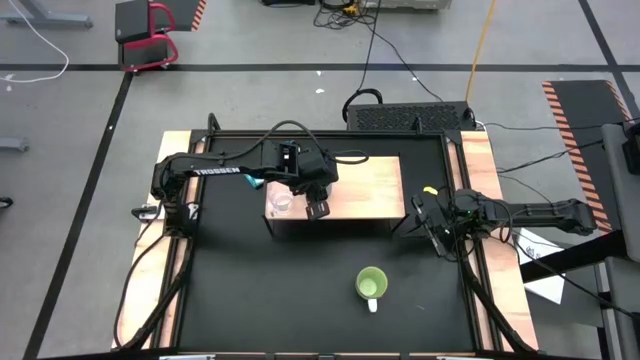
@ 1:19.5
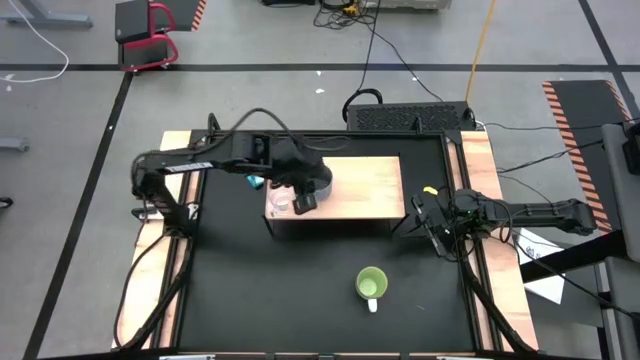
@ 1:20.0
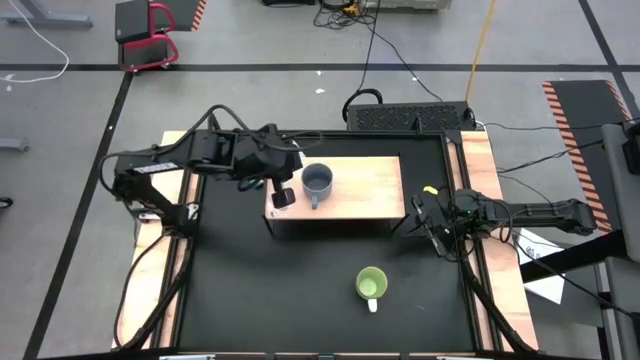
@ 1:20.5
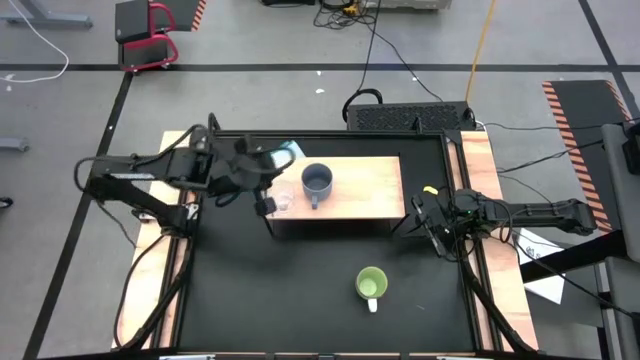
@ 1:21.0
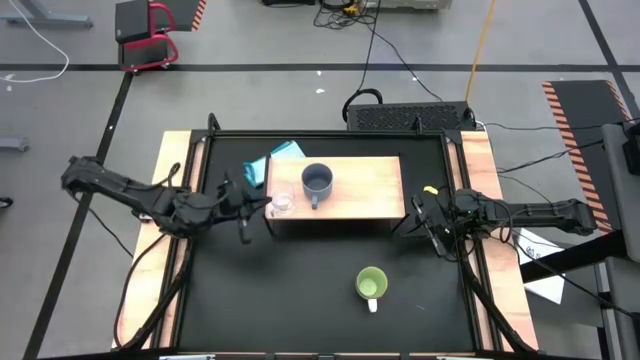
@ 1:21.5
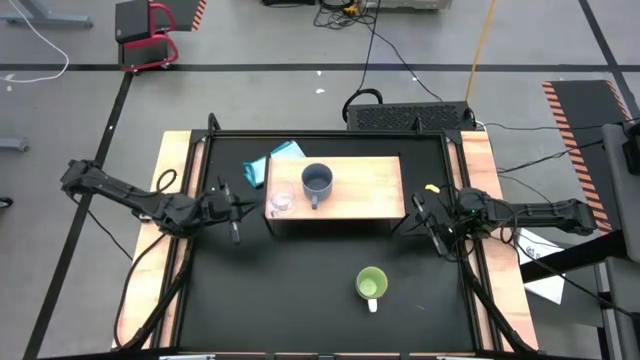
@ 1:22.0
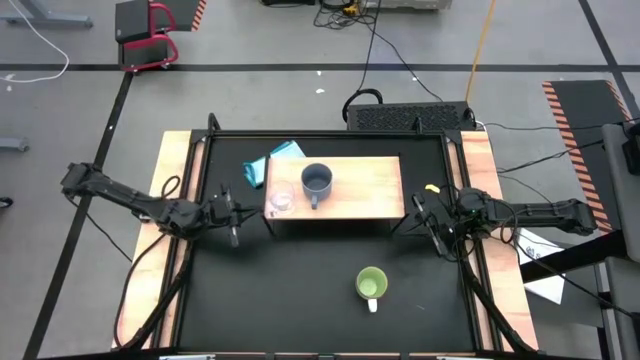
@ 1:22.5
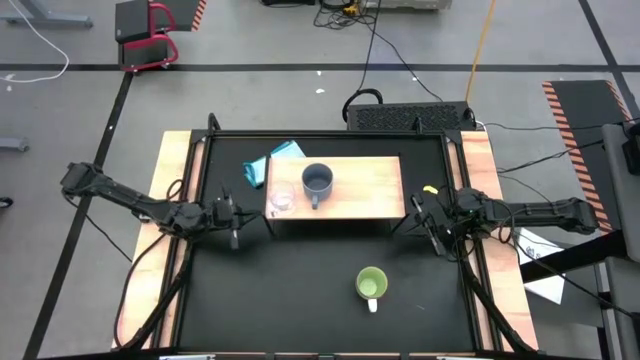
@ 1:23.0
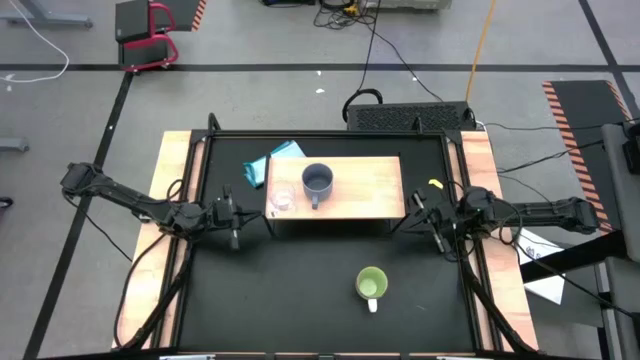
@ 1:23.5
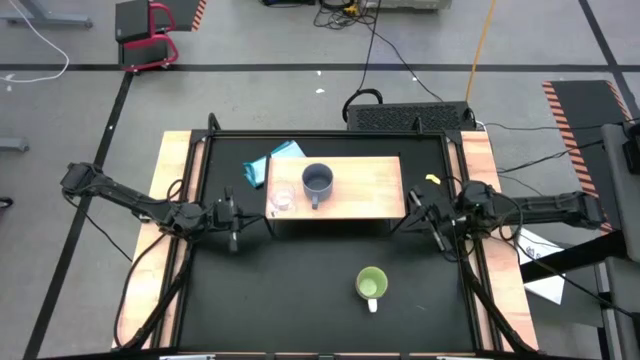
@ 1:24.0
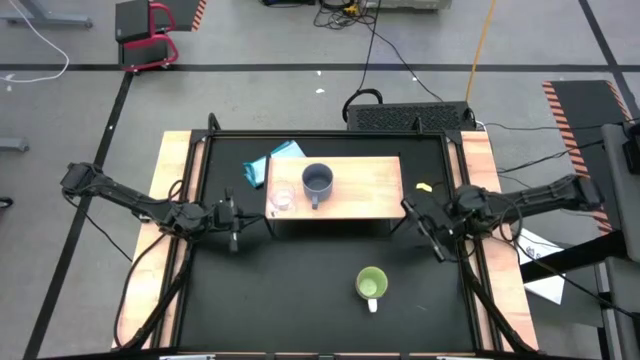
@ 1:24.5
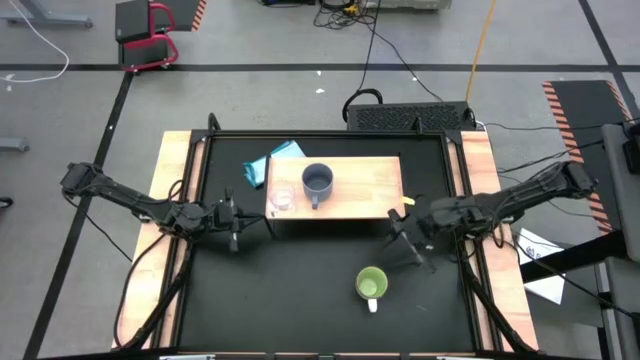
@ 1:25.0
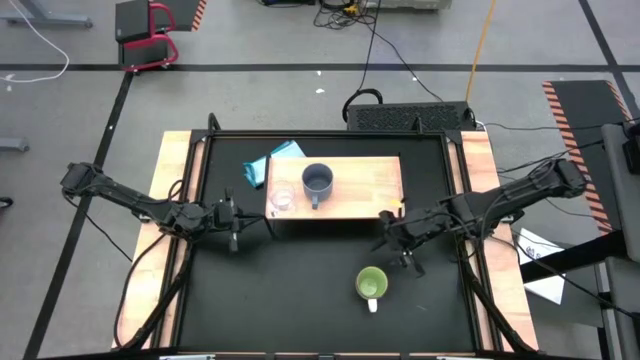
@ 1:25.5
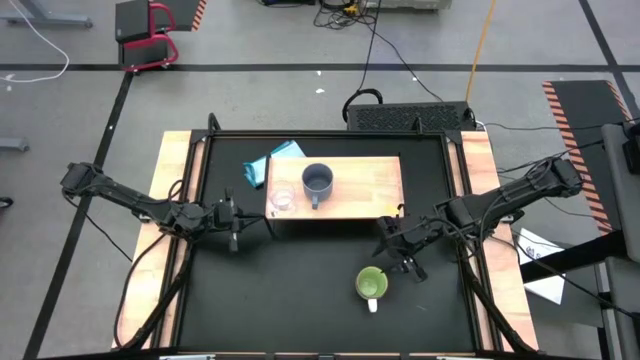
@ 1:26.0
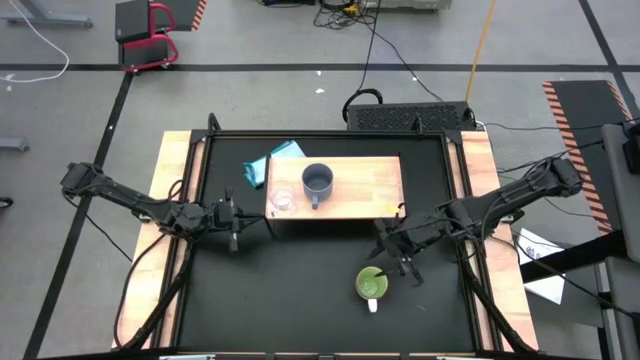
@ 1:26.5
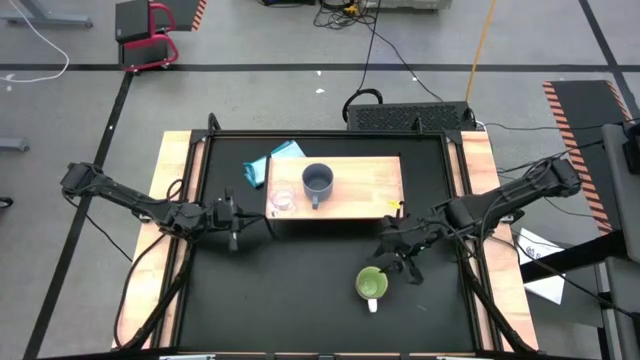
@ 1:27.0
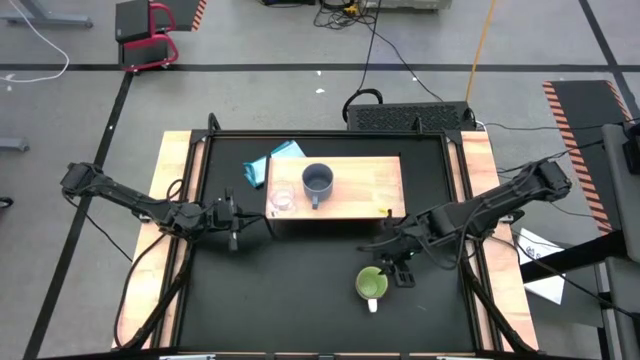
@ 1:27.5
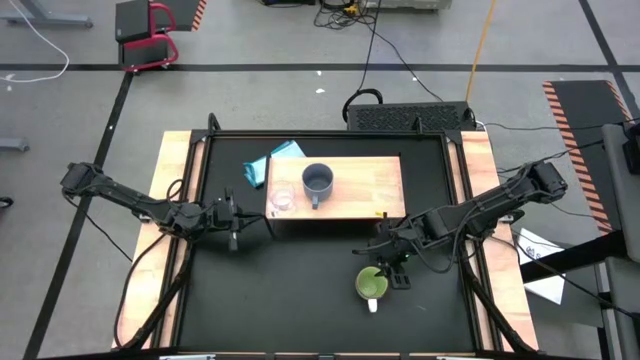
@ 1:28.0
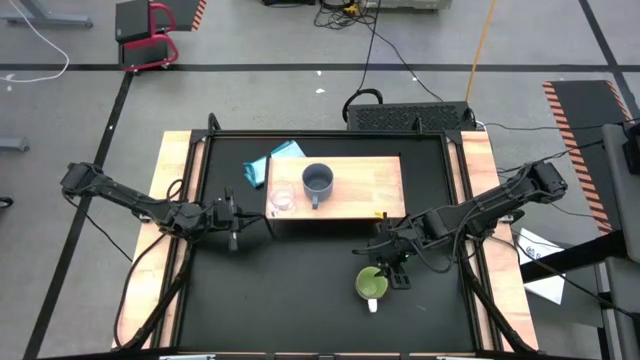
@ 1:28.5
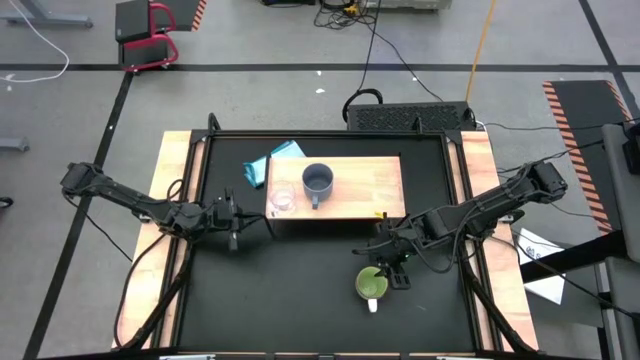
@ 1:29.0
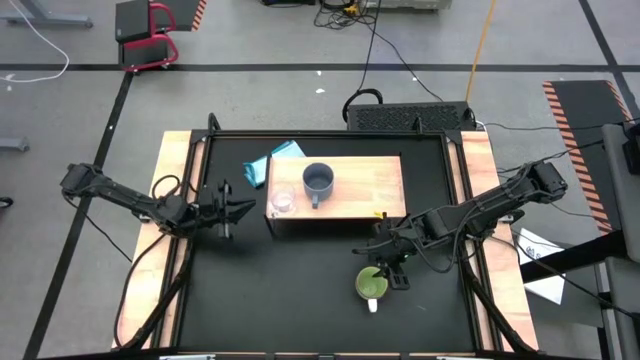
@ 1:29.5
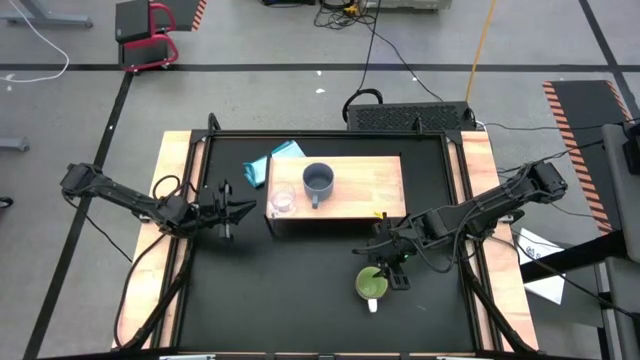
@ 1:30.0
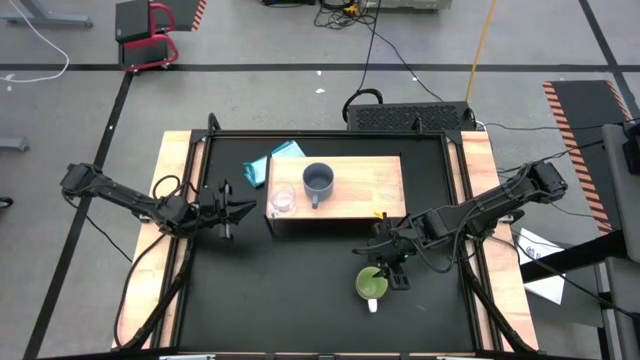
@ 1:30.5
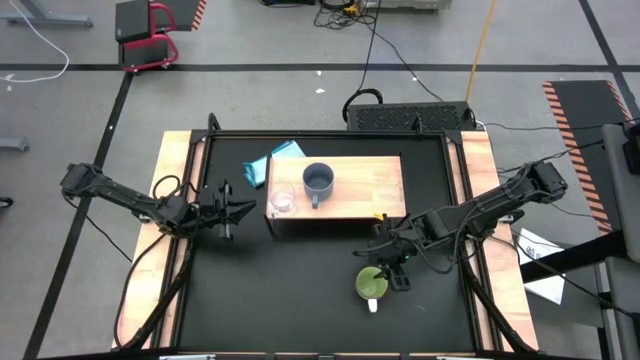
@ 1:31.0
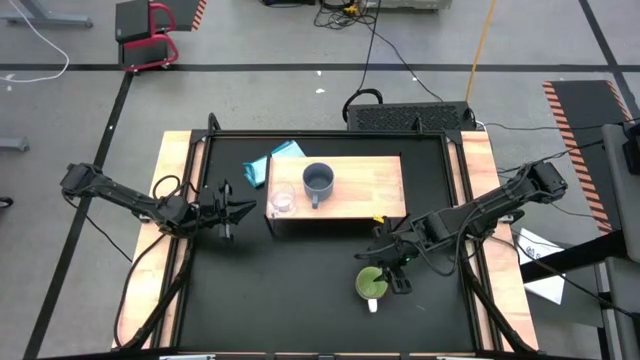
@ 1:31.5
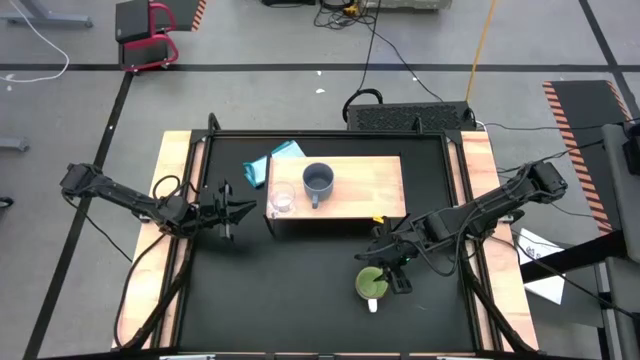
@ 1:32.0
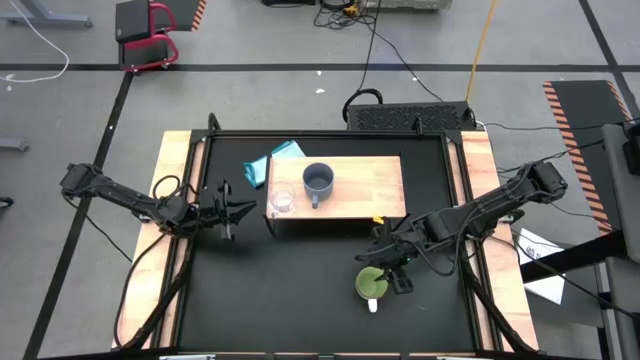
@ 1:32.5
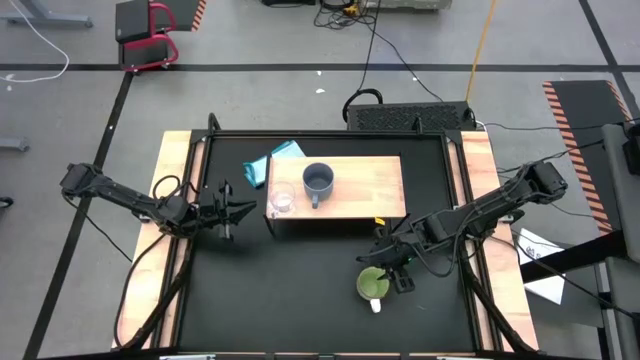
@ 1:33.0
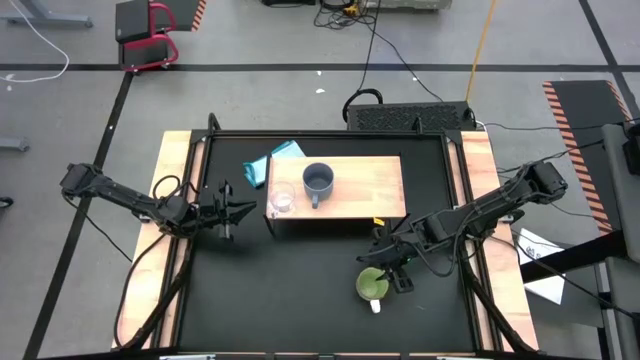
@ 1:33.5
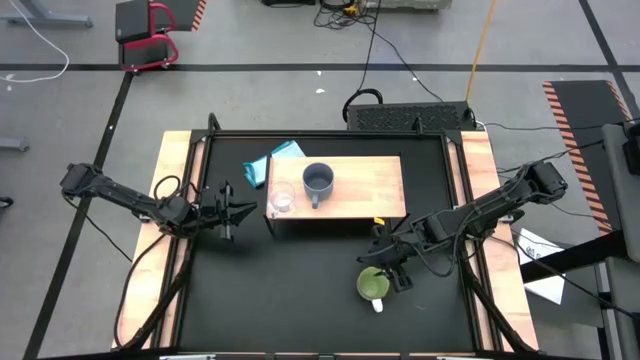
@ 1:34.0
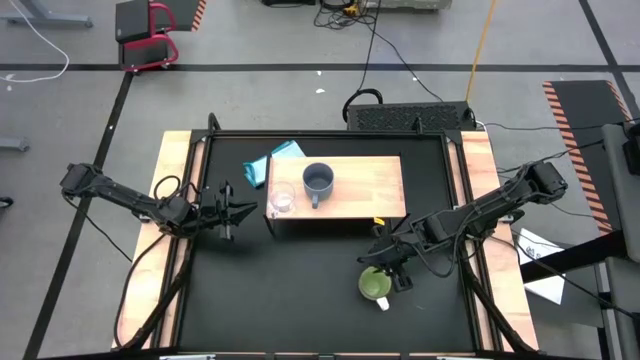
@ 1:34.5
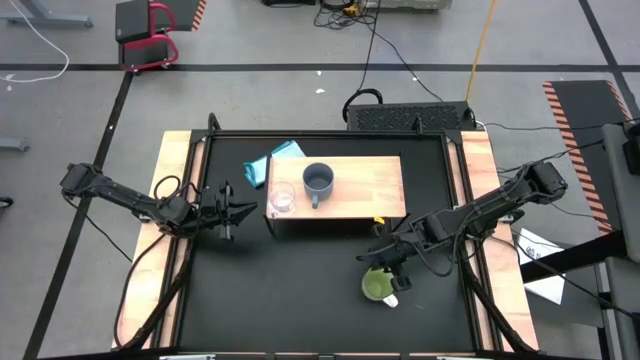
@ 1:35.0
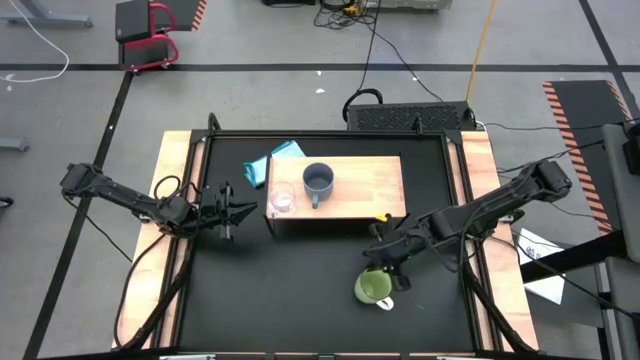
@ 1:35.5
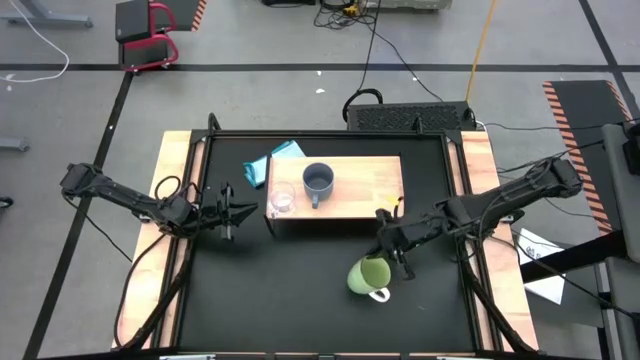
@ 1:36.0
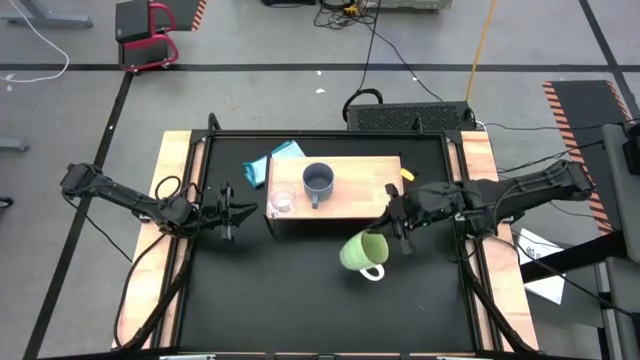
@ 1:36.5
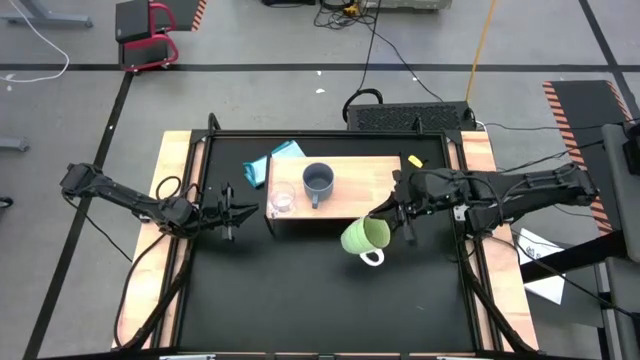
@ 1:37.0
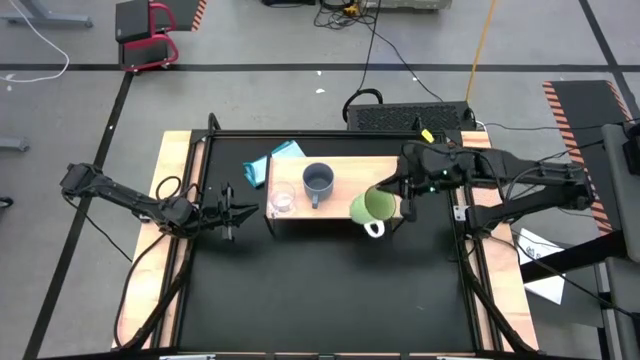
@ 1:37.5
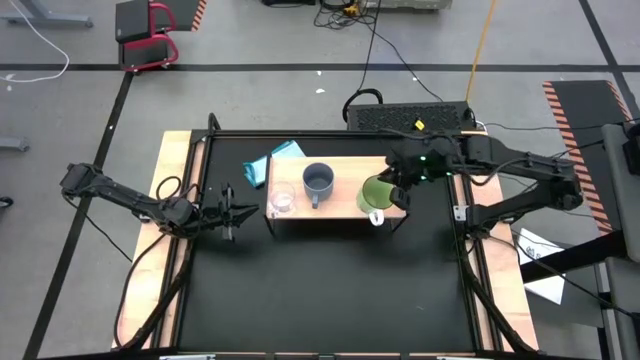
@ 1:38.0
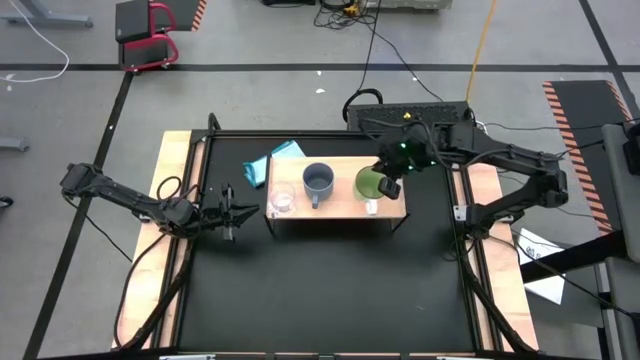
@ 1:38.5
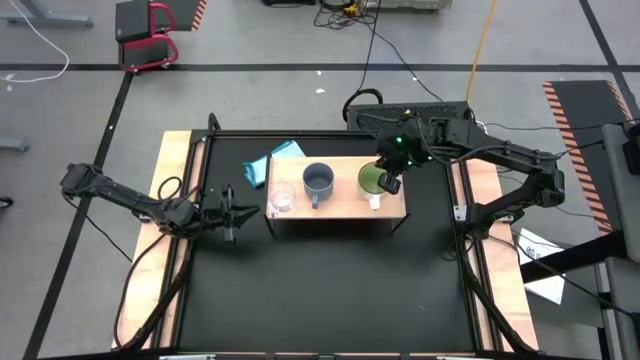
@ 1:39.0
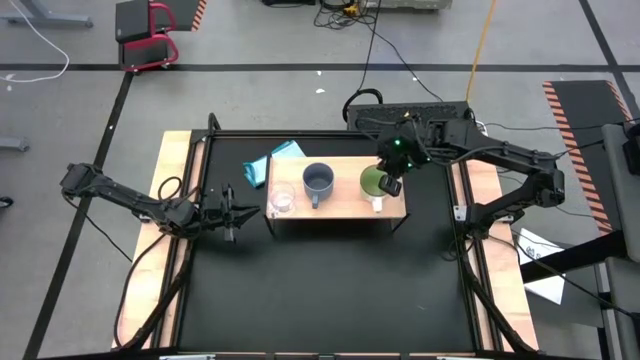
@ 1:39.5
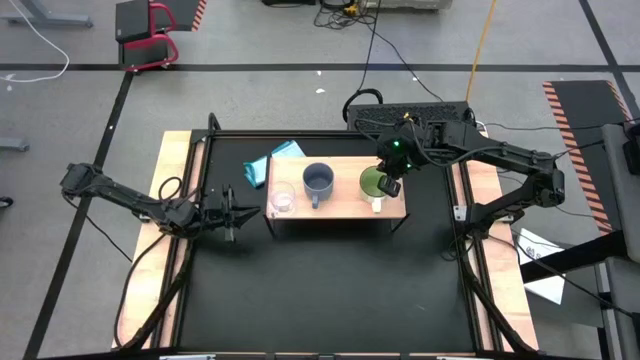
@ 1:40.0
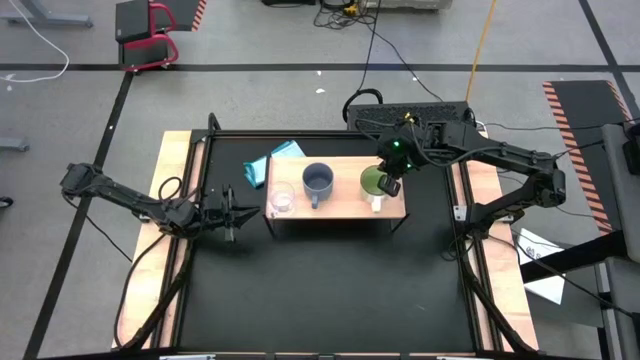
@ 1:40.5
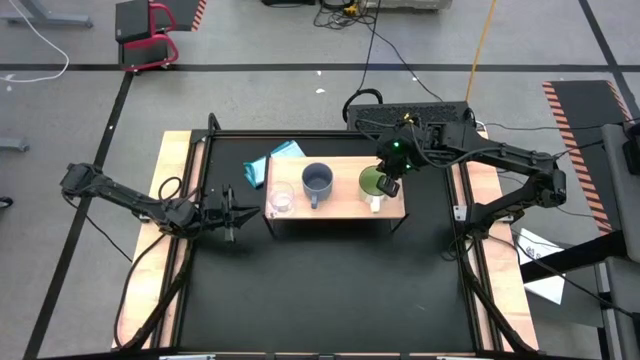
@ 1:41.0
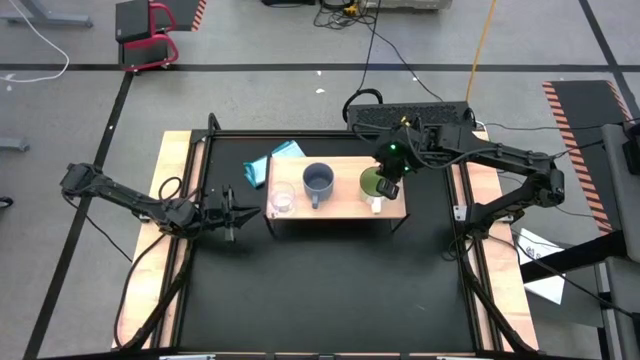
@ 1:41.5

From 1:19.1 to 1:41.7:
Task: Stack small to large cups/mugs on shelf
Put the green mug on the shelf
